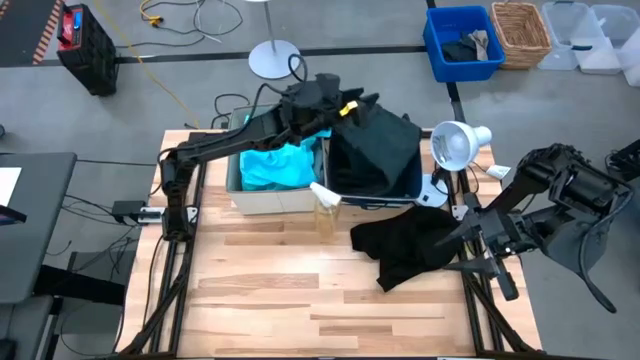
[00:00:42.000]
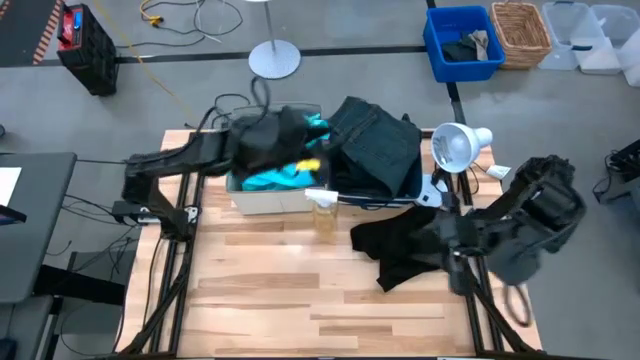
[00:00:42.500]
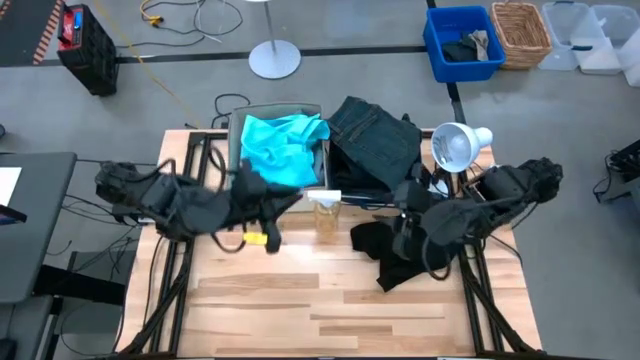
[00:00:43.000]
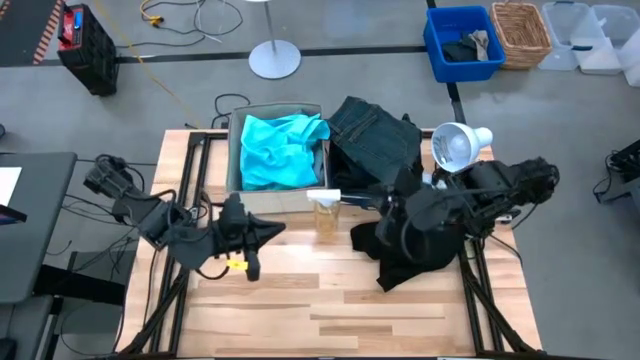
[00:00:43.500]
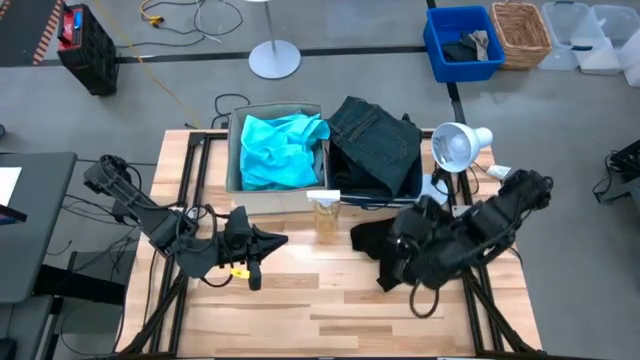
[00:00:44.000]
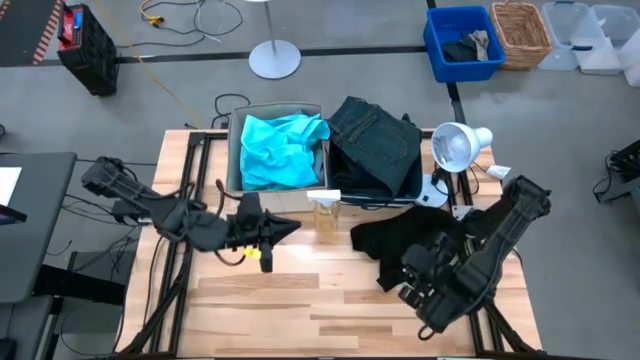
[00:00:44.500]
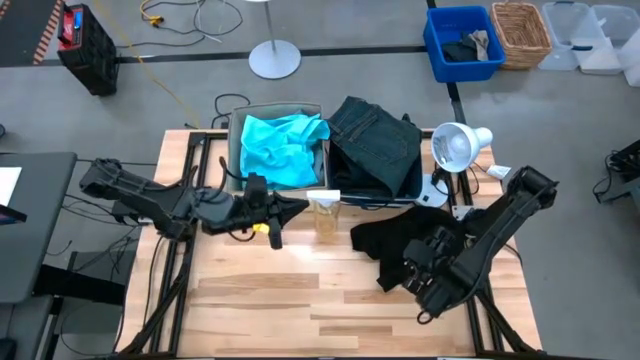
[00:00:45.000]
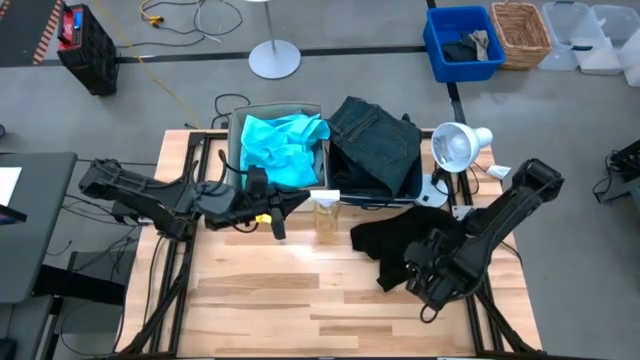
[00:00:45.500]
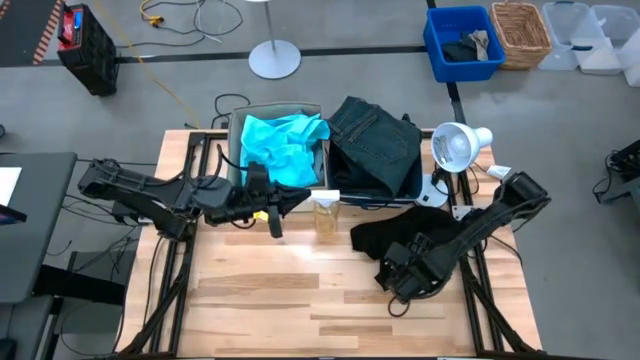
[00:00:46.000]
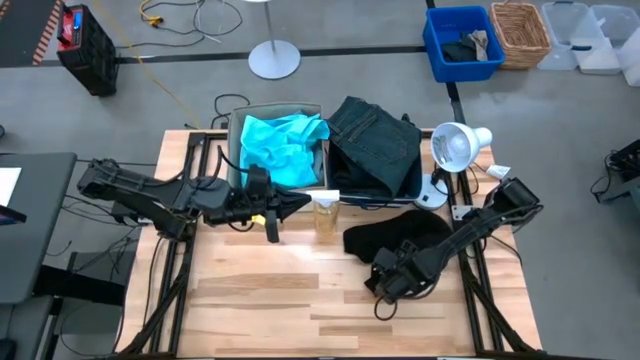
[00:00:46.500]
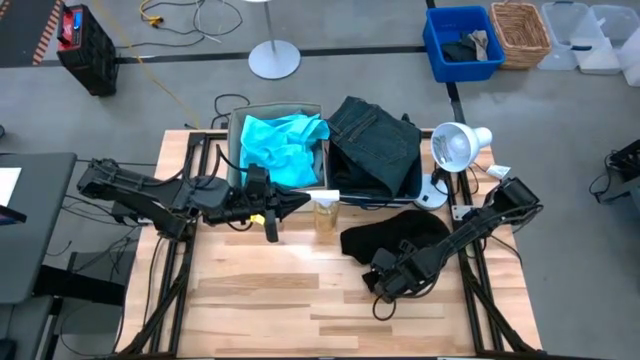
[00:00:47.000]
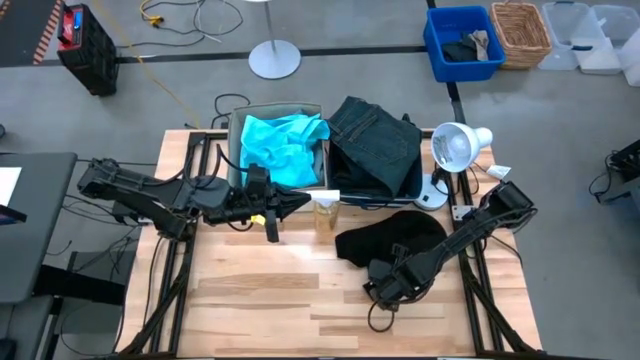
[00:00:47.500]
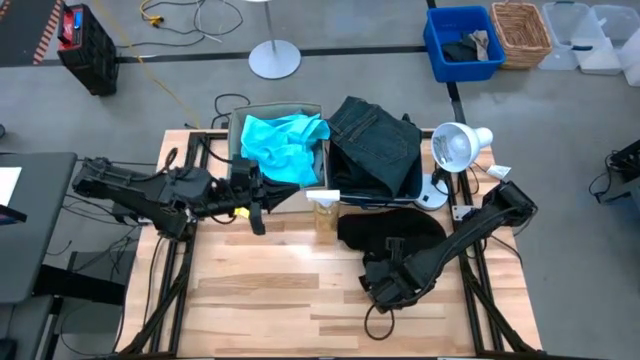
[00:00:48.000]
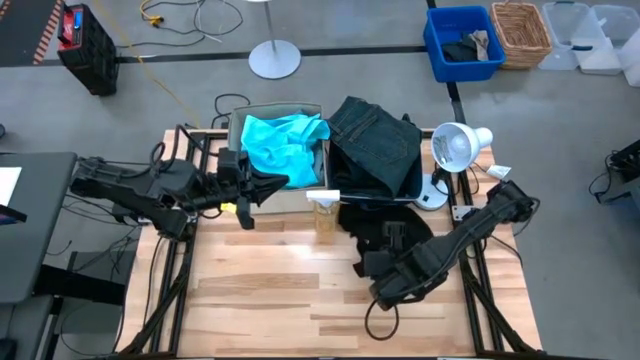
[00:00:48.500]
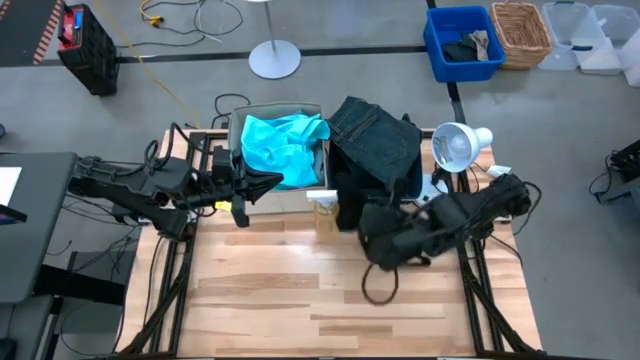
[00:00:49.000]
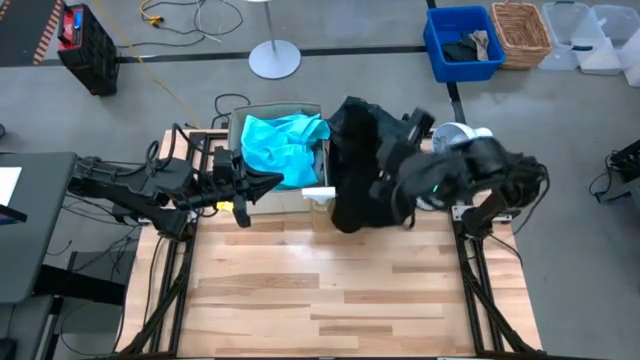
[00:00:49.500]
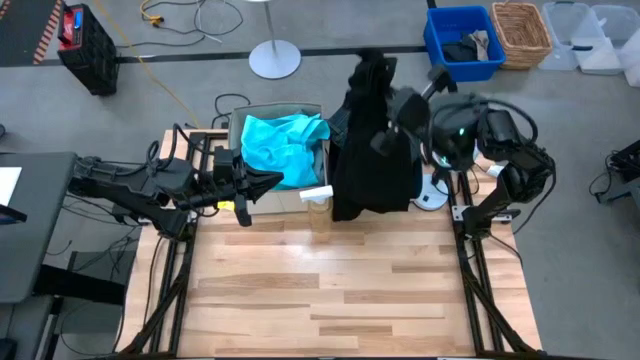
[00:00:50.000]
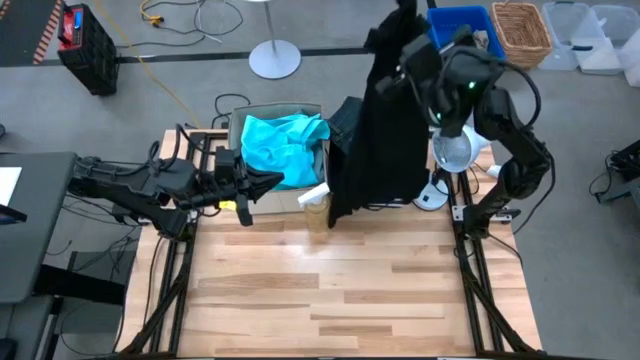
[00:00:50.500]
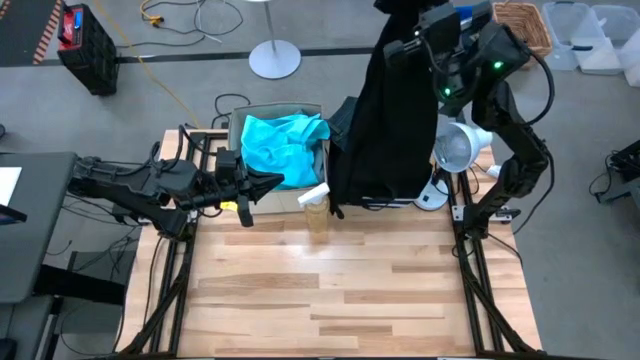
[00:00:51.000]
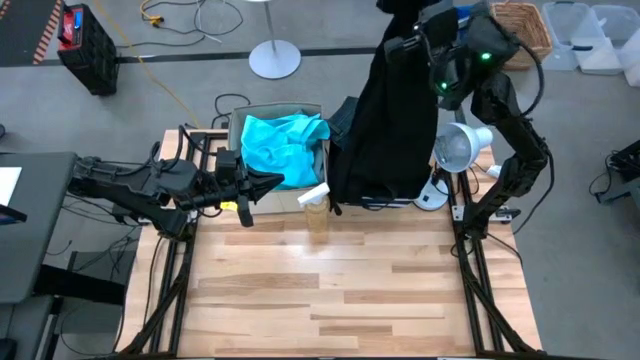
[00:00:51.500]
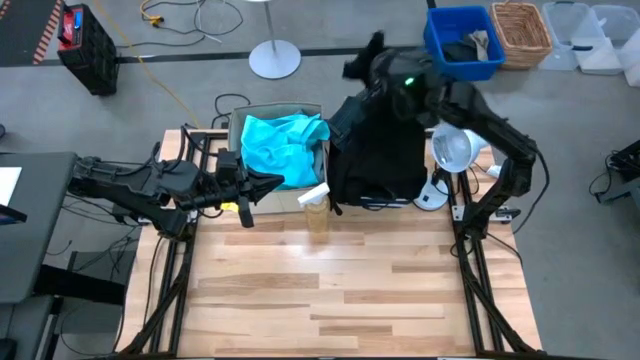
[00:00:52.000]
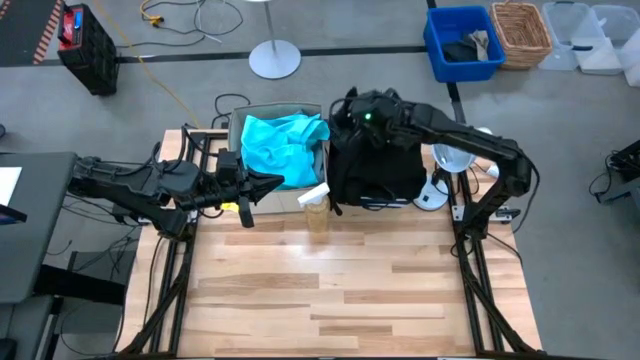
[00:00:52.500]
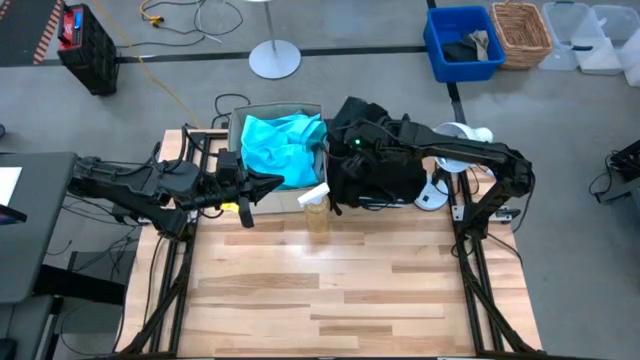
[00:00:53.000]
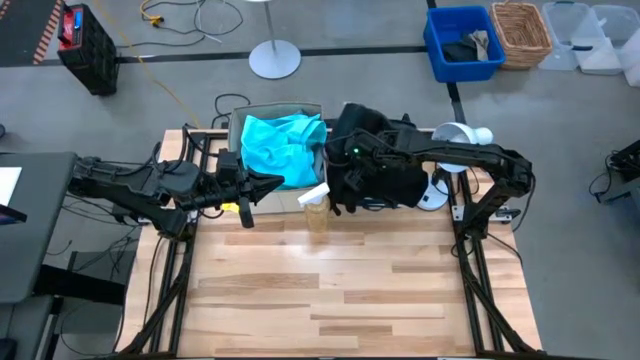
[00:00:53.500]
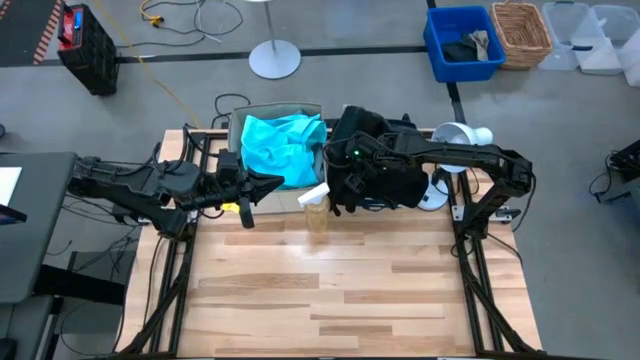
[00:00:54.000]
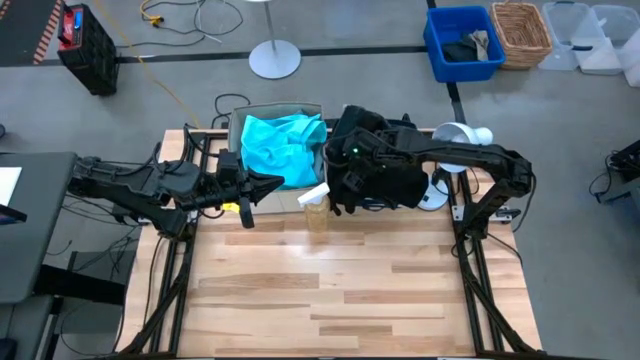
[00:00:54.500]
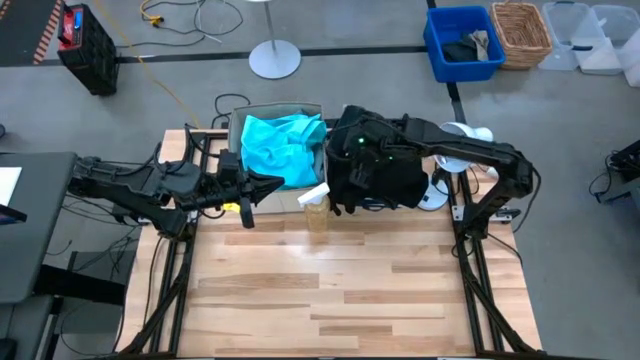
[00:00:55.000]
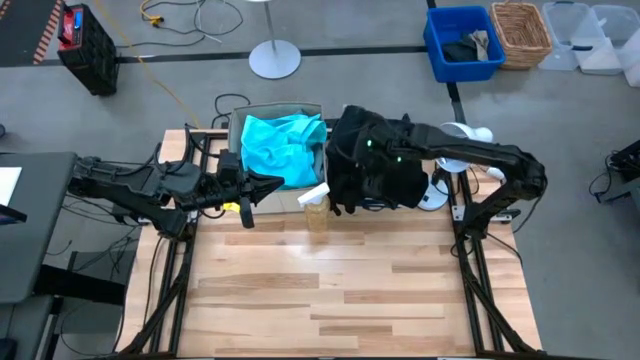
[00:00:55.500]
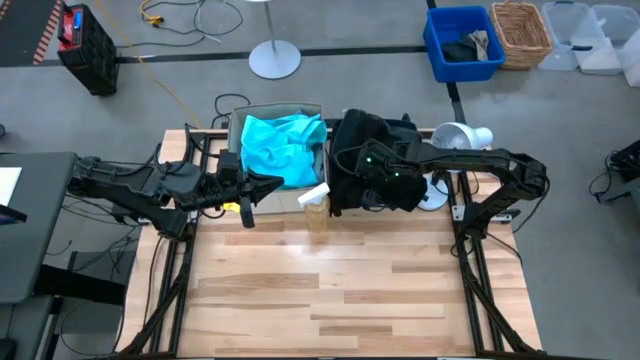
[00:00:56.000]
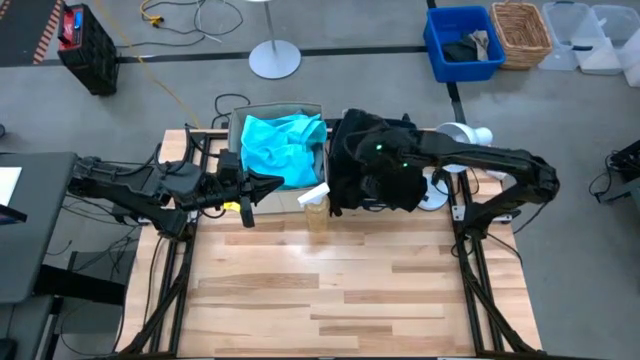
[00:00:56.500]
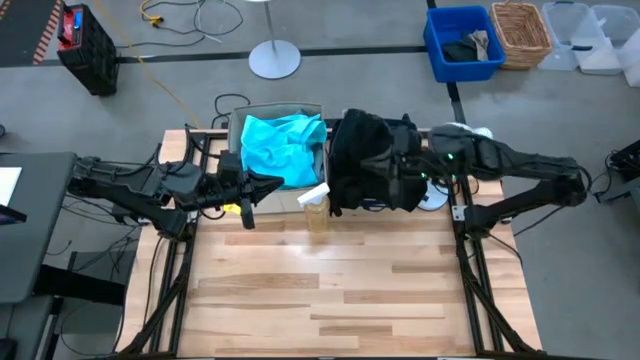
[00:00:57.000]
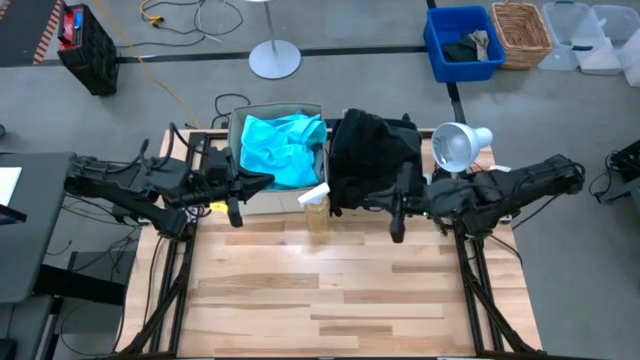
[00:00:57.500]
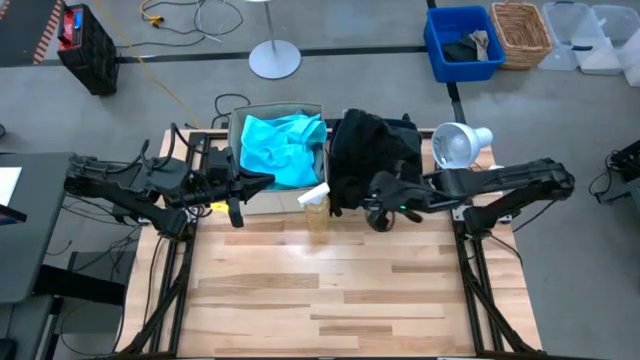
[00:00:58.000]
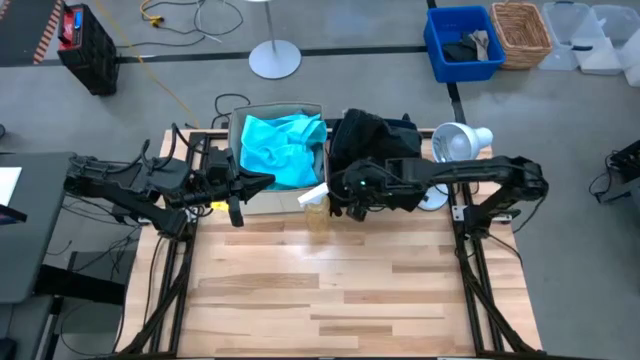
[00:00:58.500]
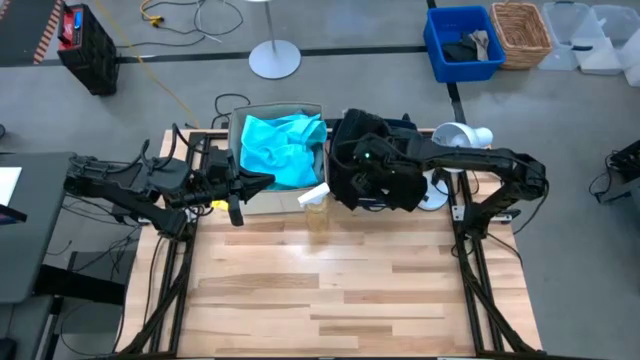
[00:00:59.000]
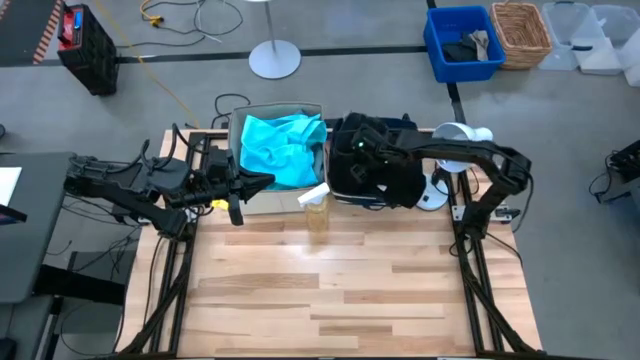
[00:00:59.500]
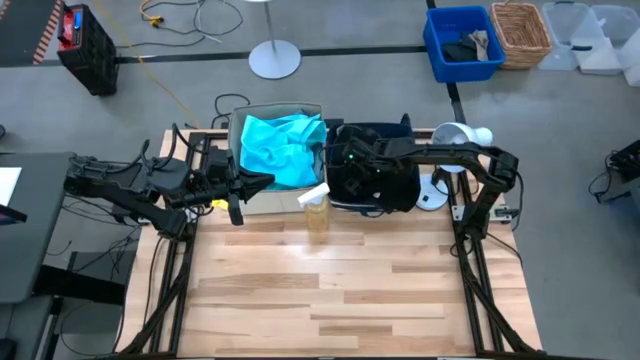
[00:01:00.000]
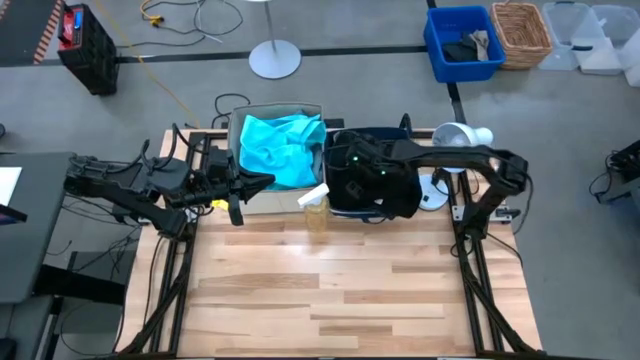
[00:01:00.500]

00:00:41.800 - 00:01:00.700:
Task: Sort clothes
Put the black shirt into the blue laundry organizer

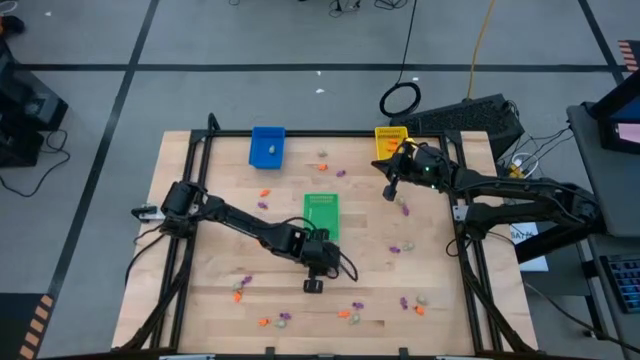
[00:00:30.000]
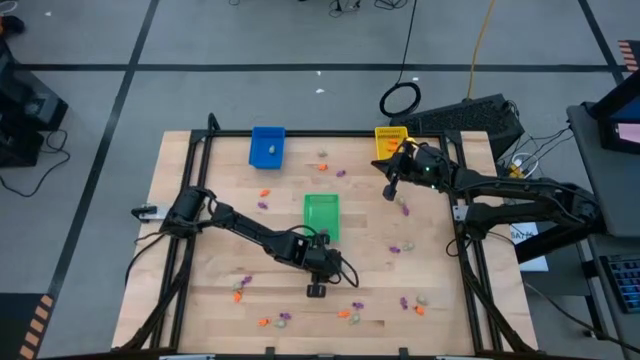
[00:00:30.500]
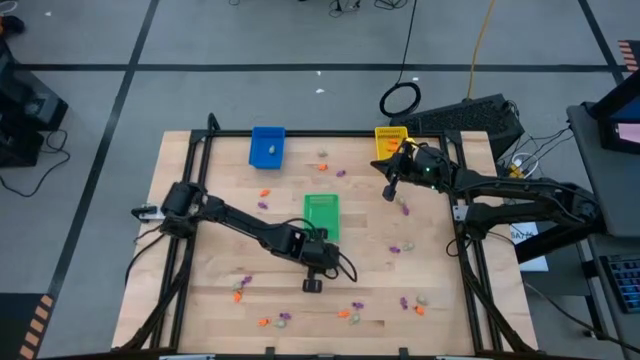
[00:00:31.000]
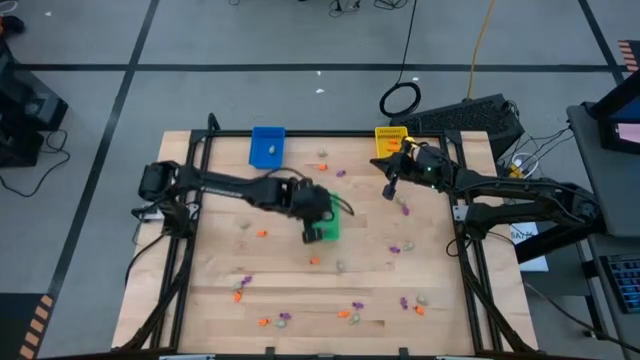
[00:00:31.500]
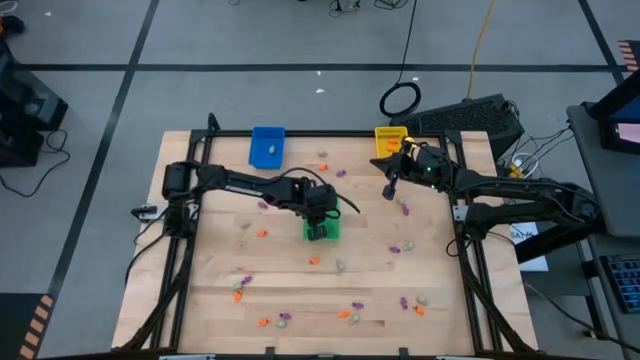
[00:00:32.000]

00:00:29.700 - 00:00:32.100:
Task: Sort Halloween decoration
Put the purple skeleton toy into the green bin
